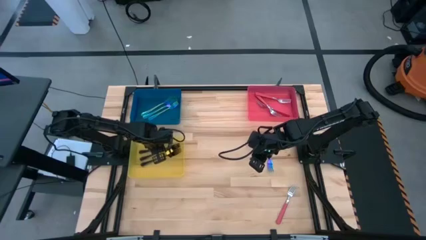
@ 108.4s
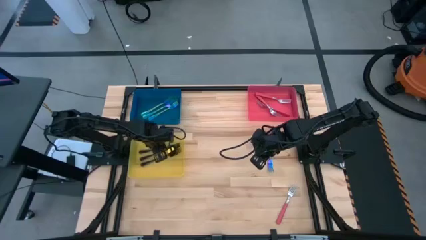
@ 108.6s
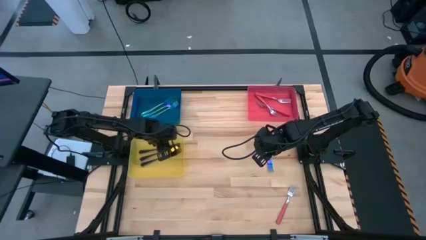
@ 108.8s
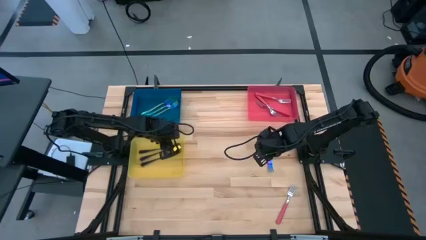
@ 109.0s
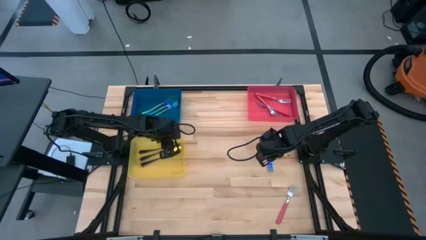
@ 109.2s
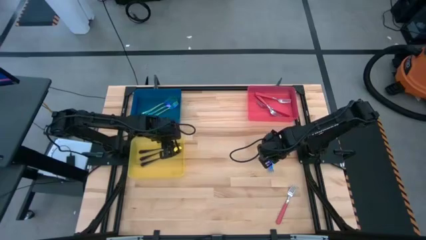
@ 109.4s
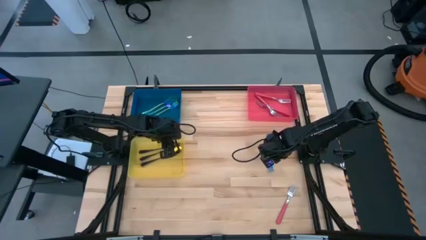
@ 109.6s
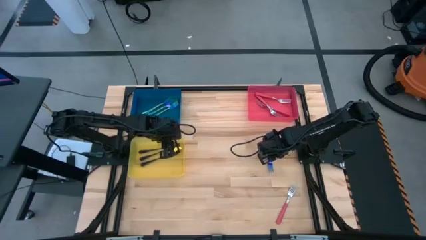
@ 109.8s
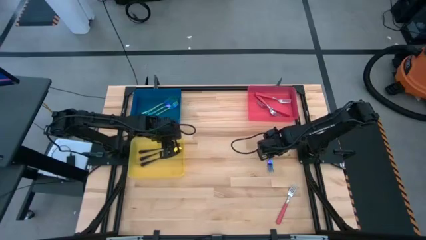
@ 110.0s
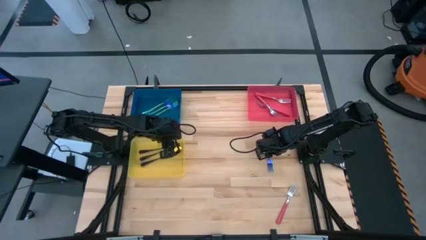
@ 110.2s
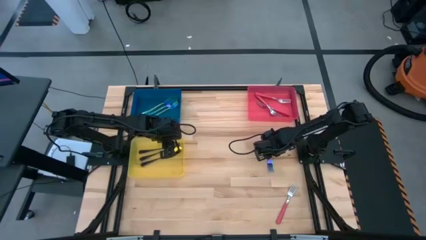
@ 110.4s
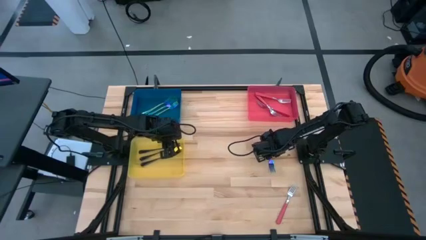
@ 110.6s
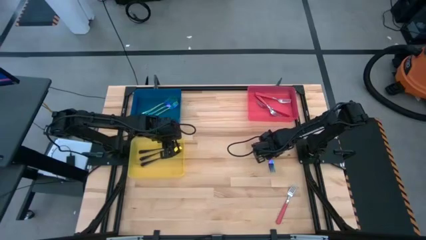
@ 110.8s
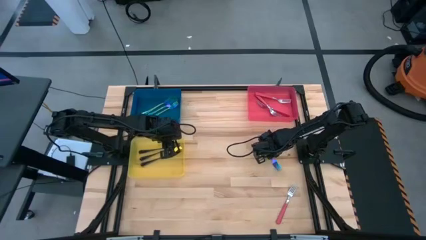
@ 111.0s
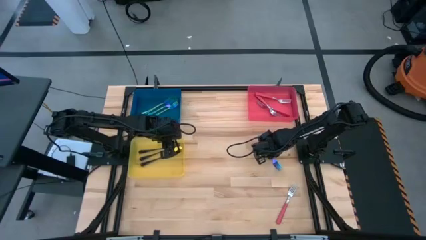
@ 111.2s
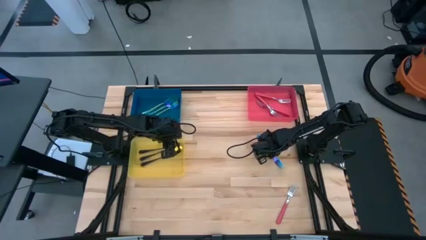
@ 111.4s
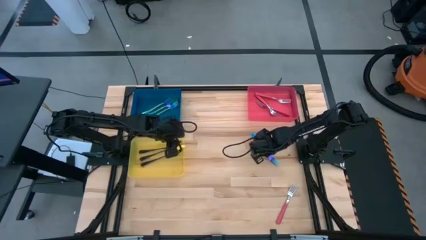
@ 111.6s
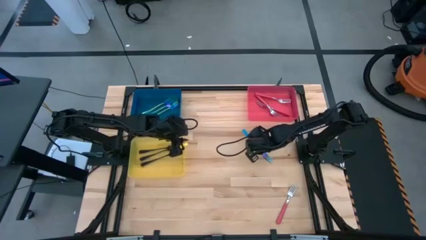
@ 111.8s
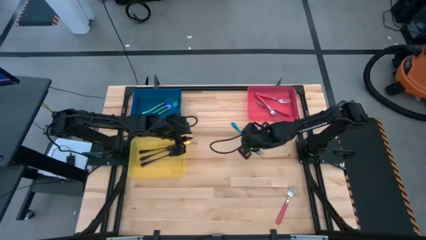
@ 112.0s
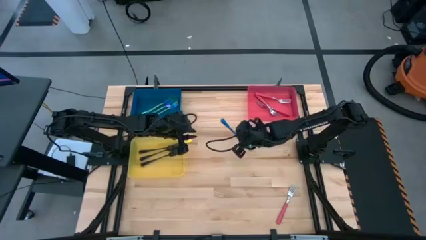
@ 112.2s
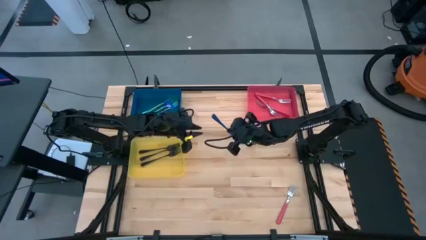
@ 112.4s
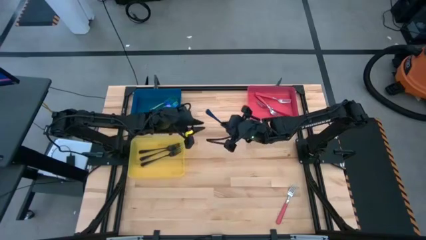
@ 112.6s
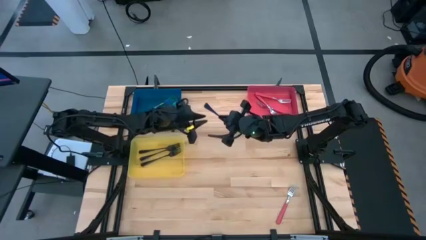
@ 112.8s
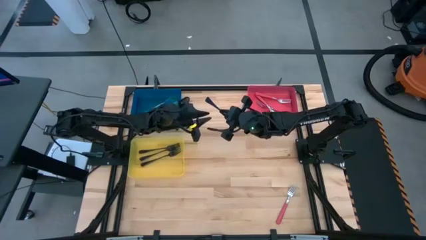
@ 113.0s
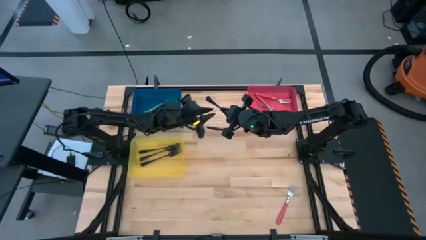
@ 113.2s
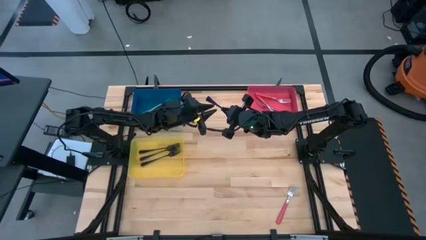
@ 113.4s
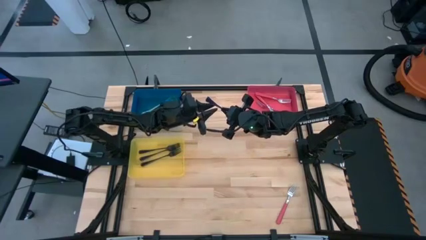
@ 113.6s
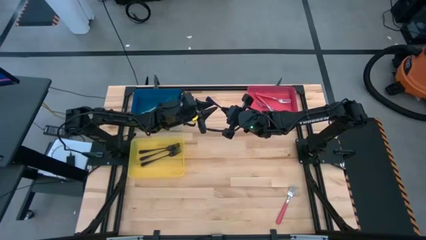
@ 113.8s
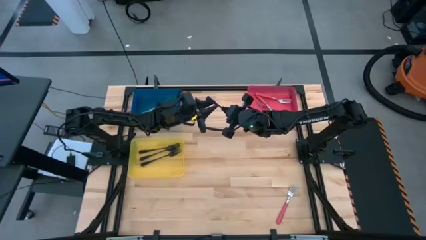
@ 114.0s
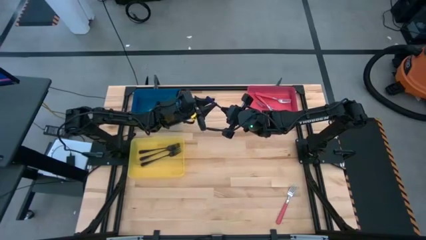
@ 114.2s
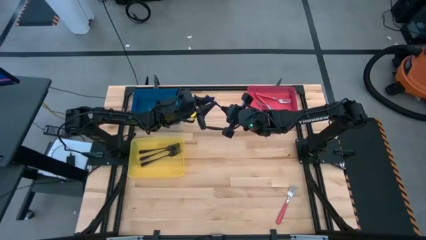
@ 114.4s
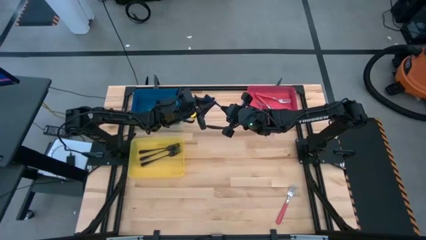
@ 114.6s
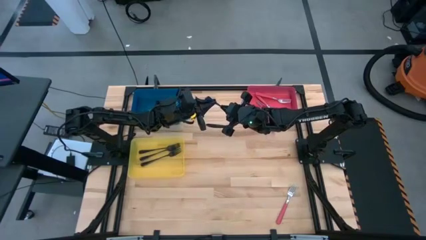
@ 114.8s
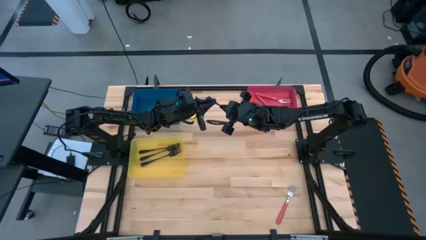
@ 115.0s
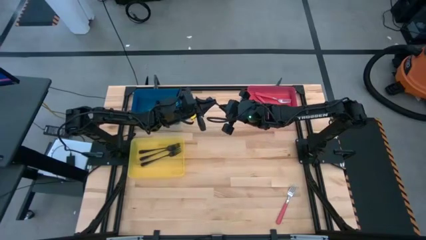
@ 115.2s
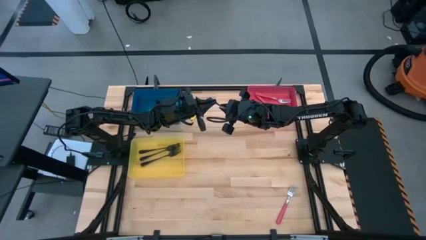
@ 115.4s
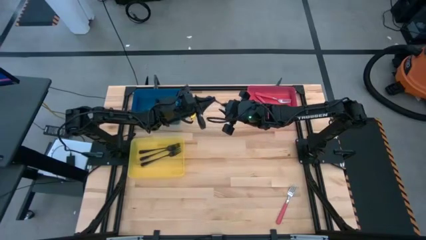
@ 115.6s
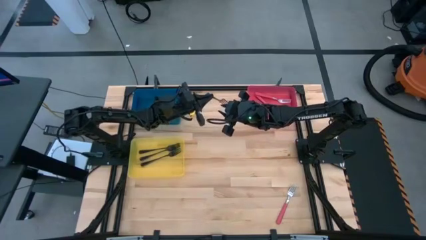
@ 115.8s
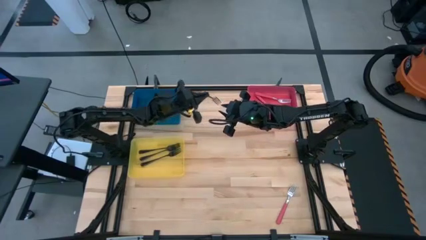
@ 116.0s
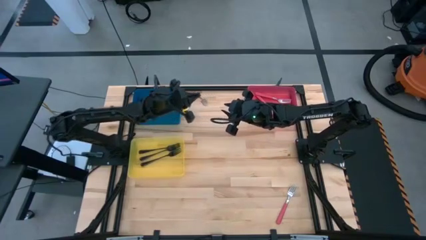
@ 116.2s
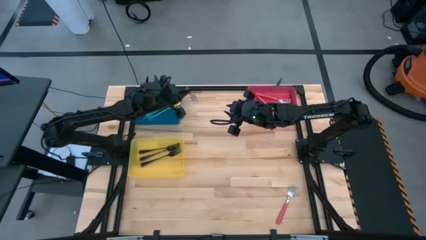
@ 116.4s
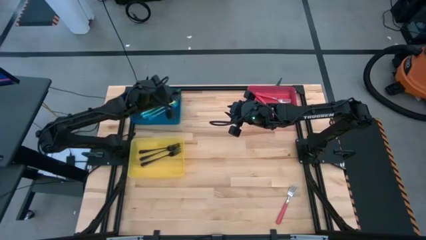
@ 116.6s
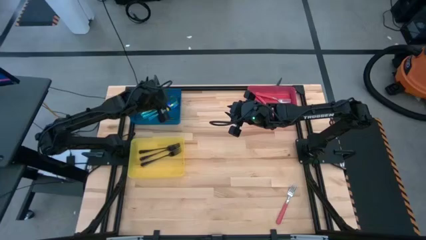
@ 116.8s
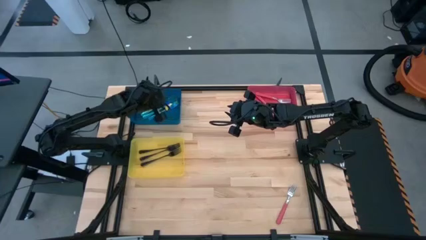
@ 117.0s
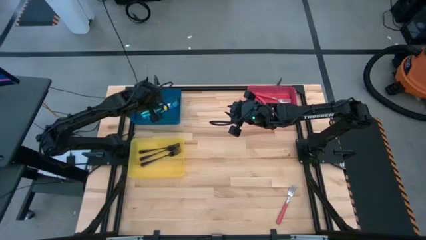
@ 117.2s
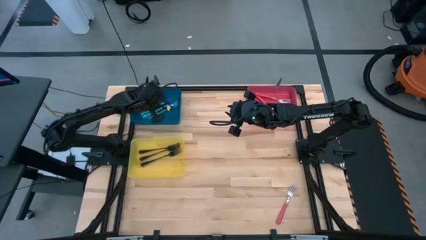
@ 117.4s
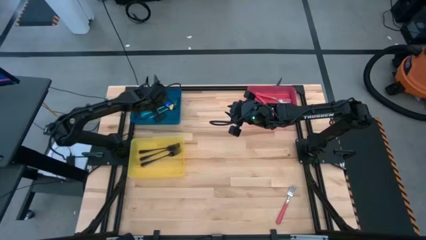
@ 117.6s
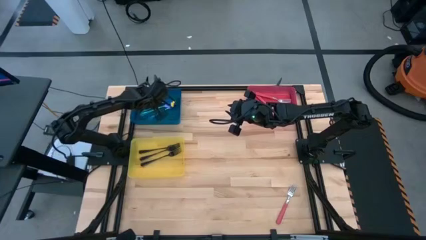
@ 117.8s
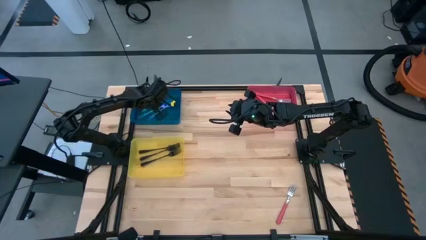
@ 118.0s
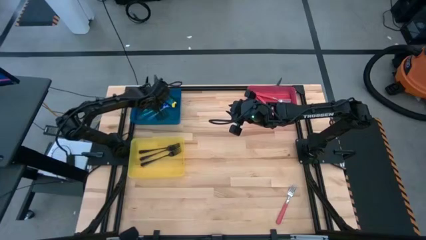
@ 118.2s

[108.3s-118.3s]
Task: Sort silverware by color (type)
Put the blue fork into the blue bin

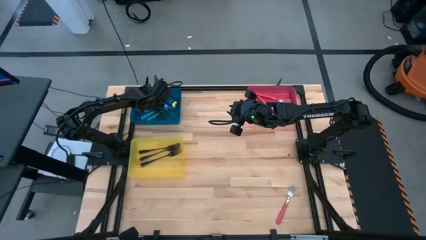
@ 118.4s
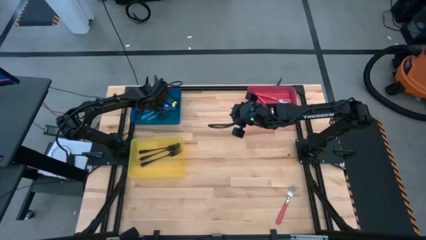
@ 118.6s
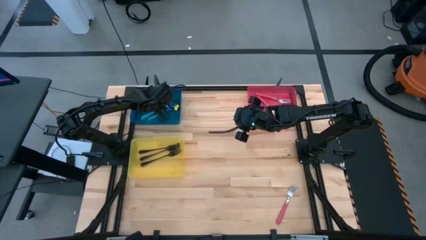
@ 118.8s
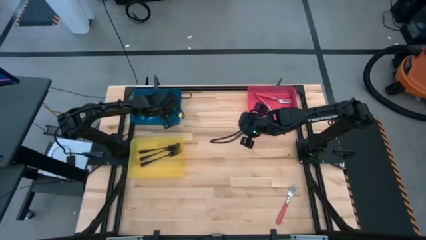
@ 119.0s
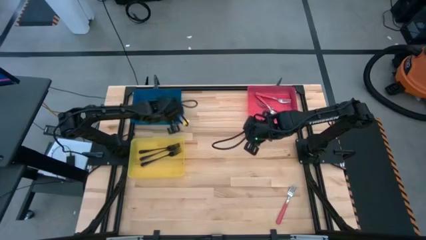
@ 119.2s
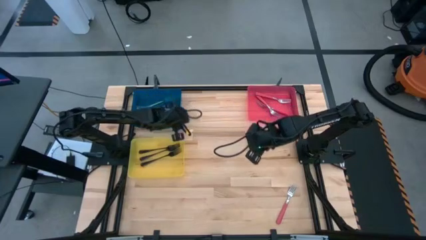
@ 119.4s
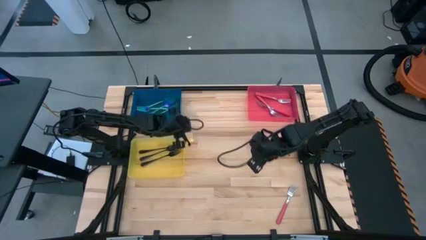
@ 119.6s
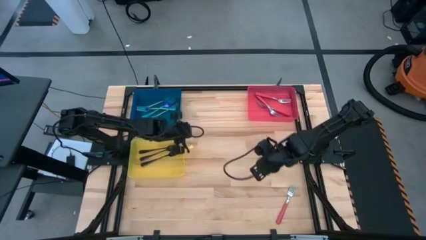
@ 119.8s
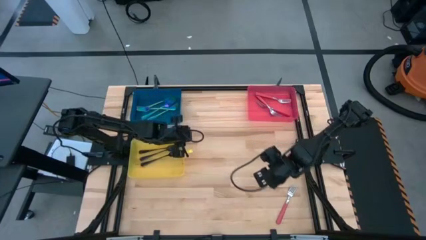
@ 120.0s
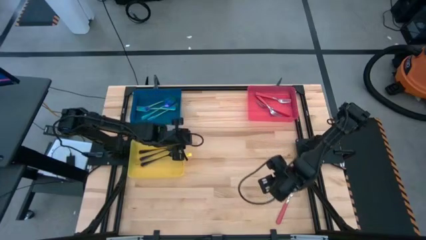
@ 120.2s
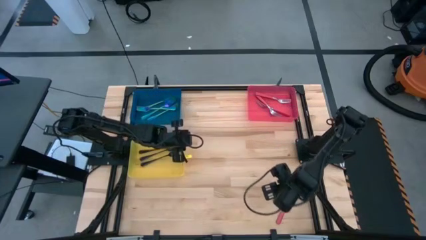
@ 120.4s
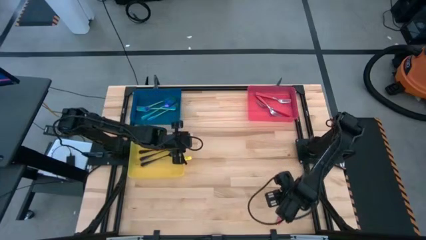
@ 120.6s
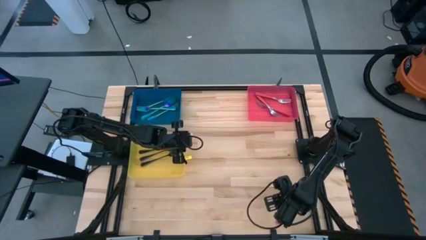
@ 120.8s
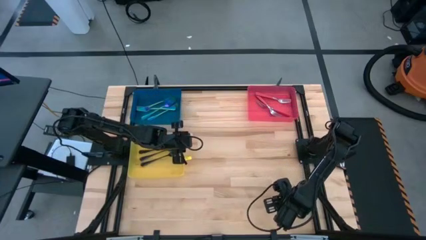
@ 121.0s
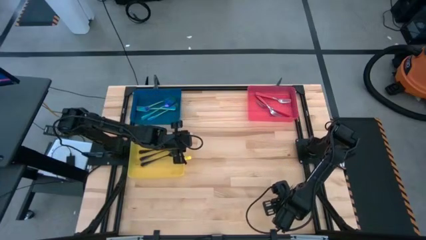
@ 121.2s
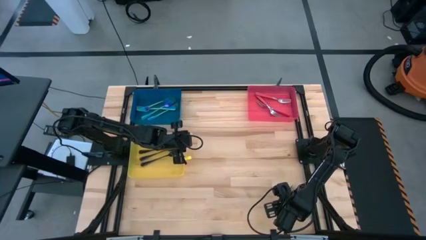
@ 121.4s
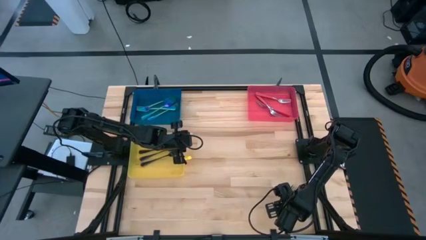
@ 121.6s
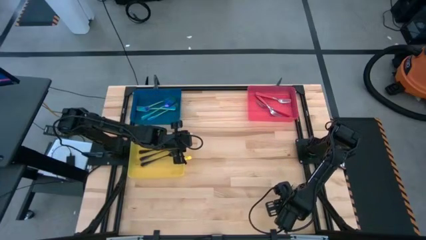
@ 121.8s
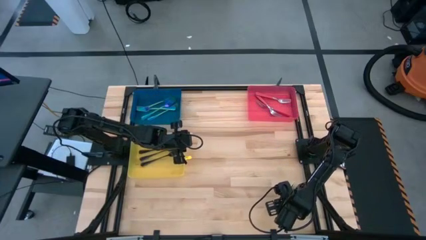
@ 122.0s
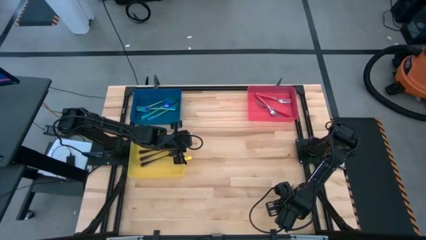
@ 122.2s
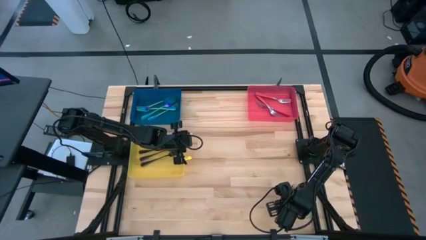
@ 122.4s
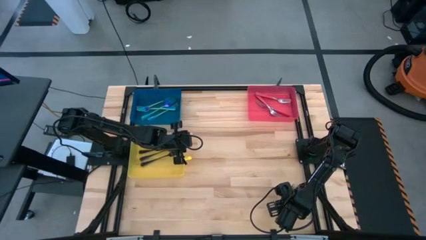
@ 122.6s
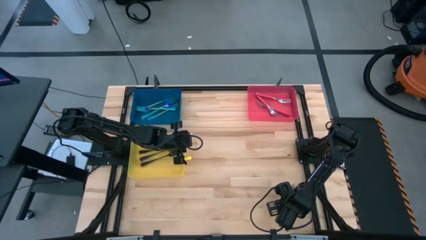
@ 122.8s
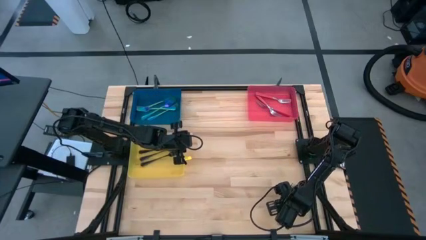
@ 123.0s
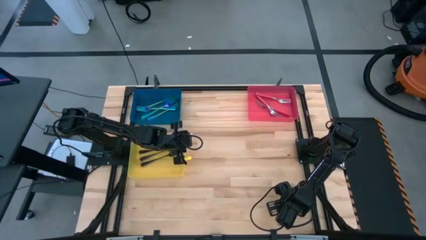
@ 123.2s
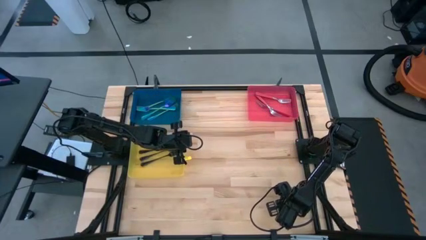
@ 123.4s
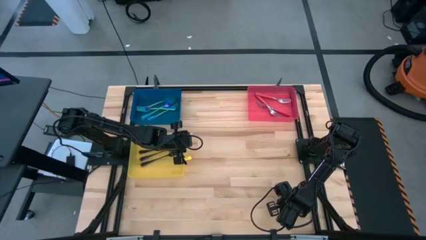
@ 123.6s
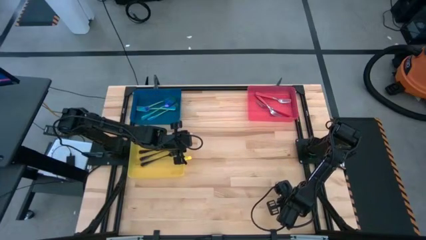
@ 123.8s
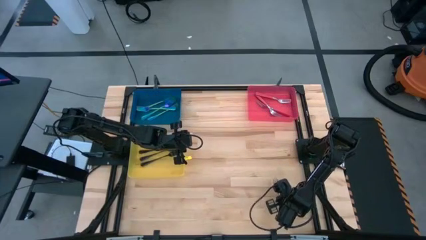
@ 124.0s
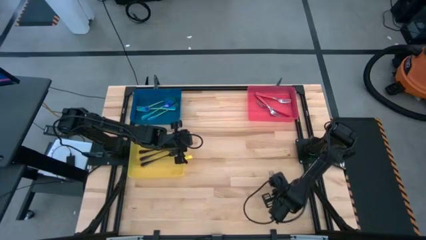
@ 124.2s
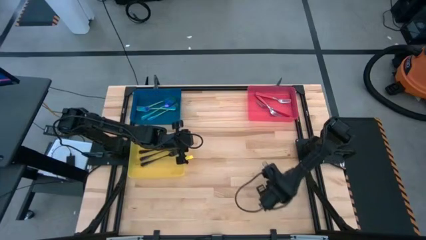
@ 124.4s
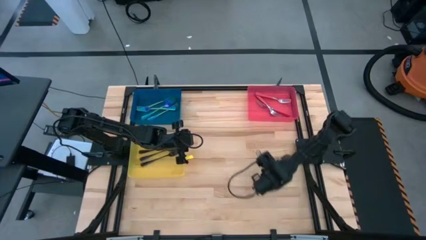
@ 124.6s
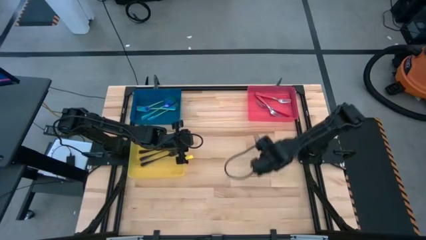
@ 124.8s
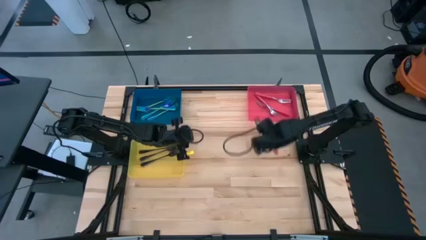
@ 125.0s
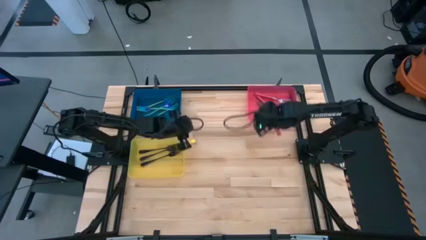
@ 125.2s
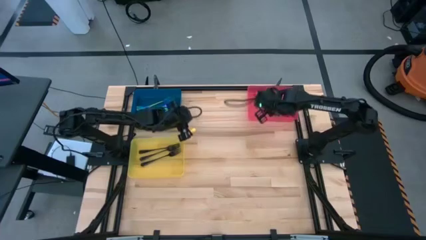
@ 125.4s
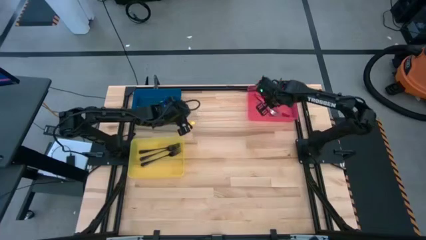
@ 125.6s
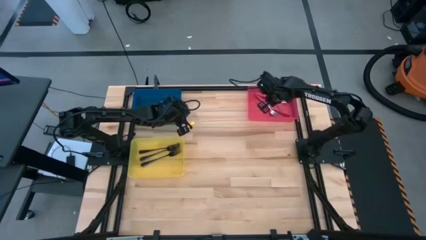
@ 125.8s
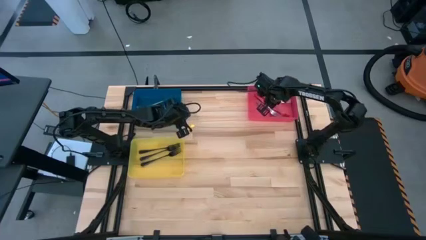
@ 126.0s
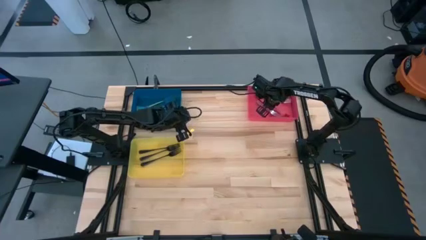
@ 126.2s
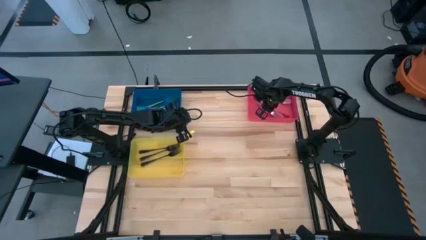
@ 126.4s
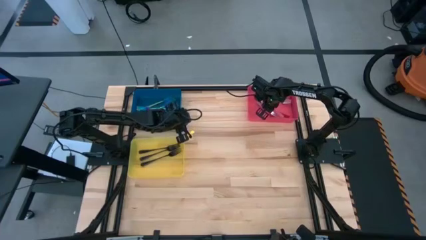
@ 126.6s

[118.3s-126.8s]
Put the pink fork into the red bin
